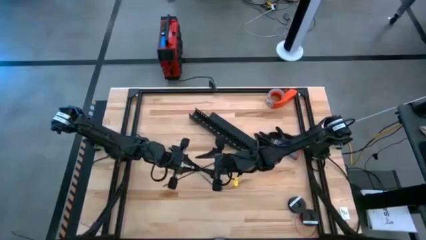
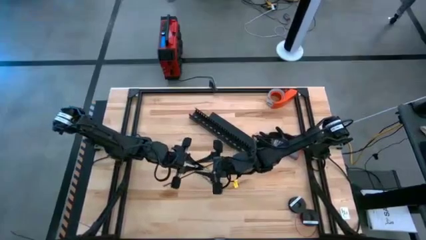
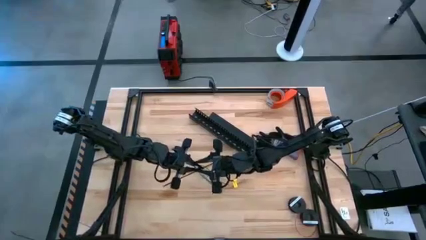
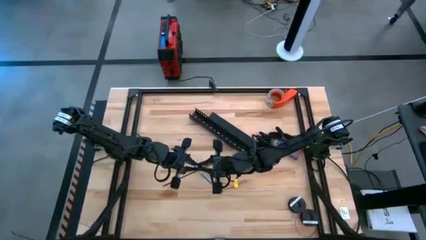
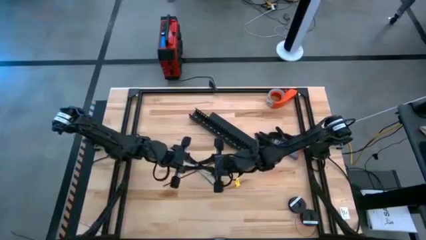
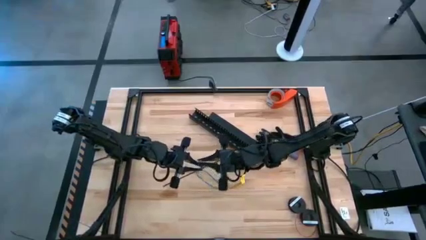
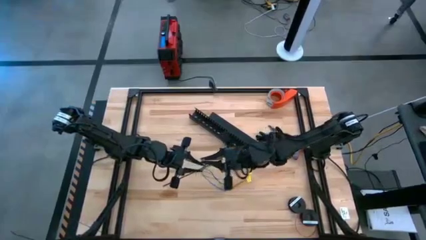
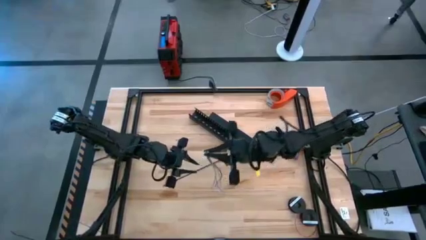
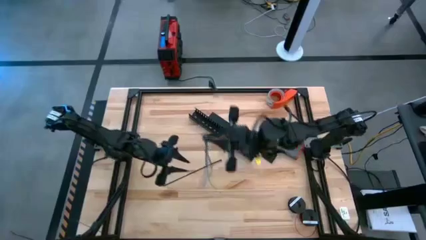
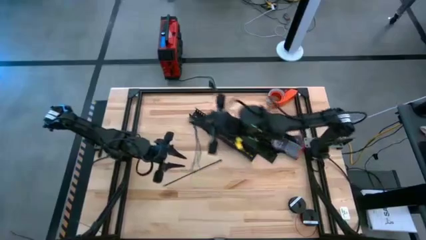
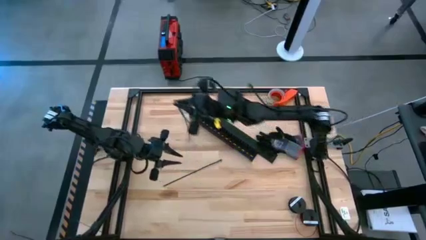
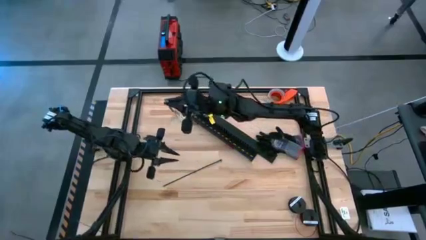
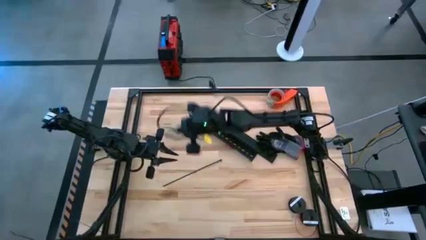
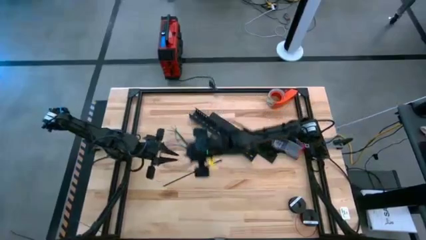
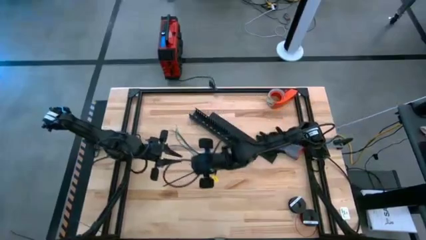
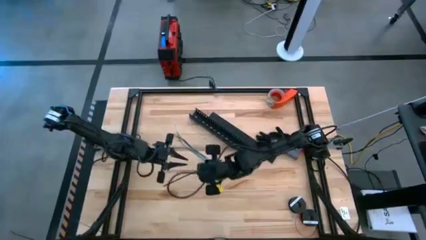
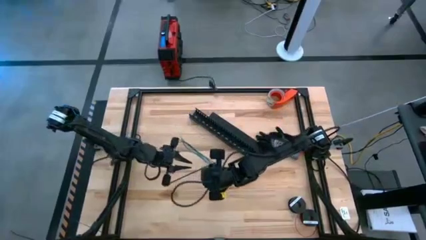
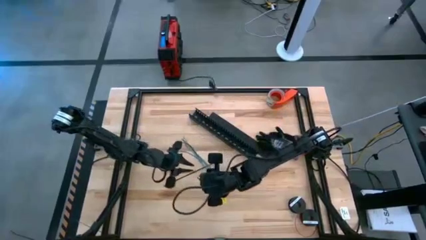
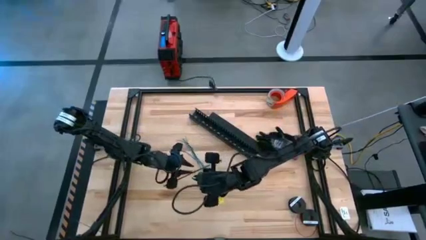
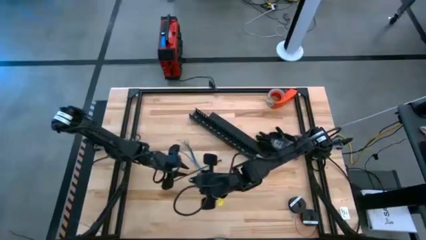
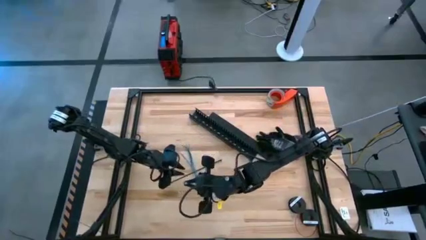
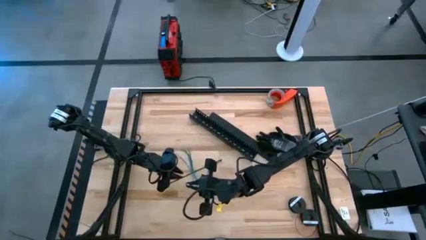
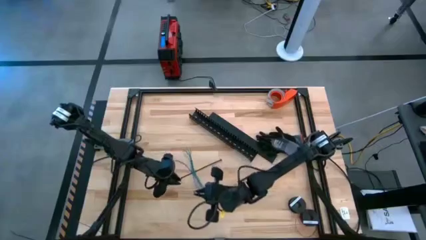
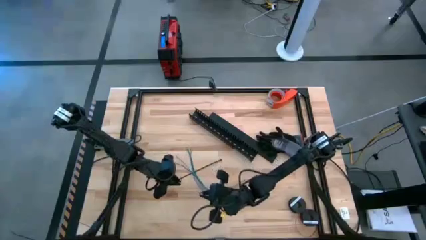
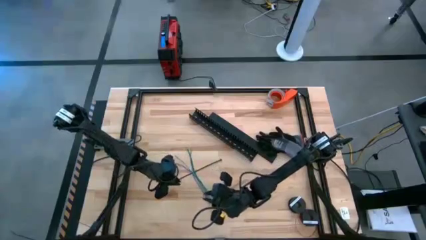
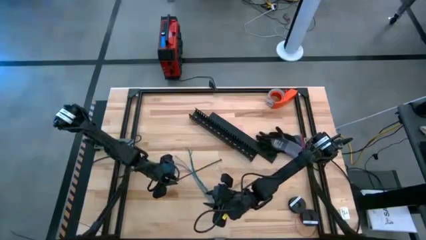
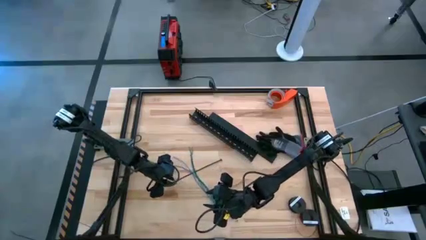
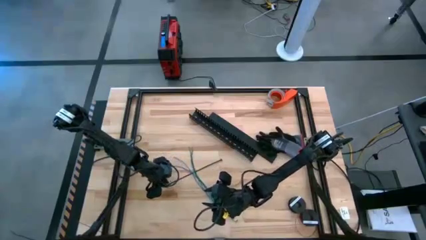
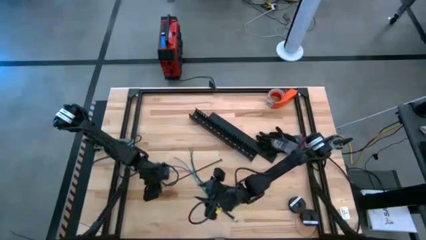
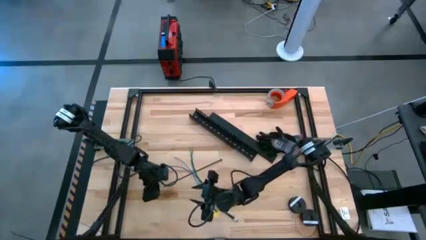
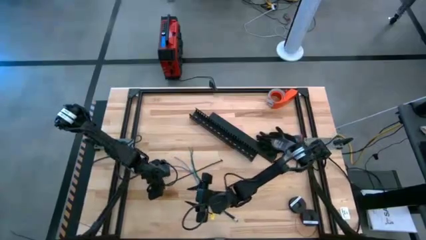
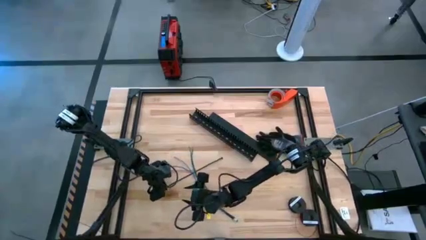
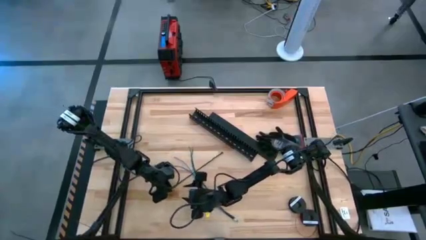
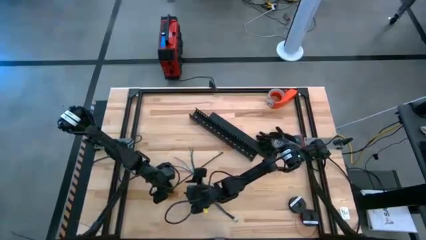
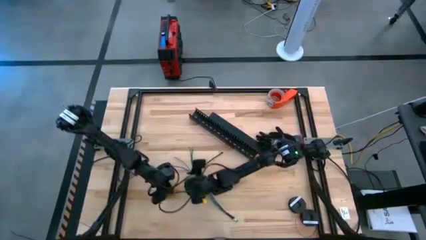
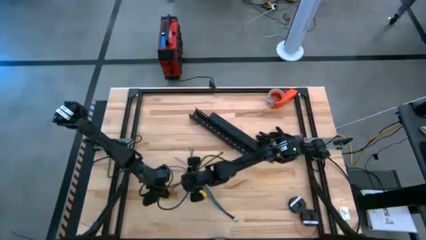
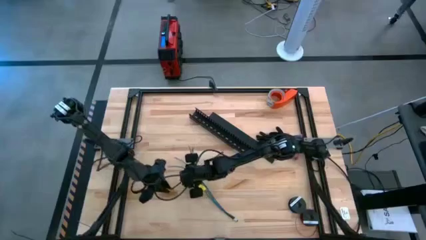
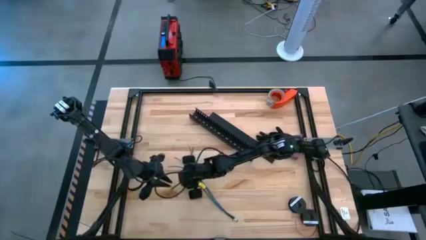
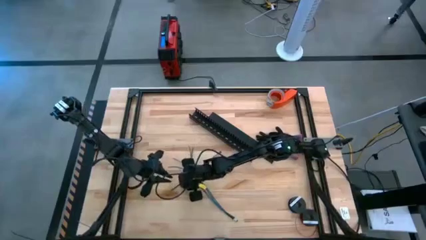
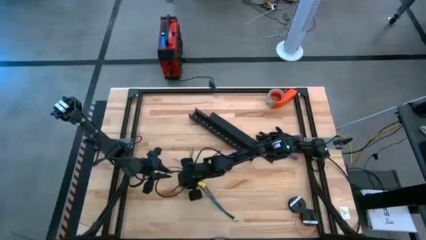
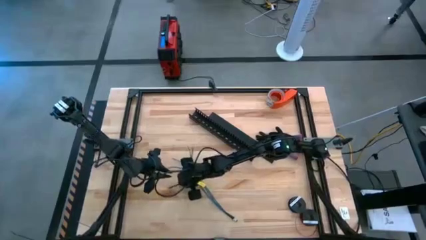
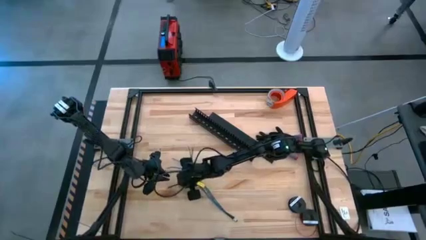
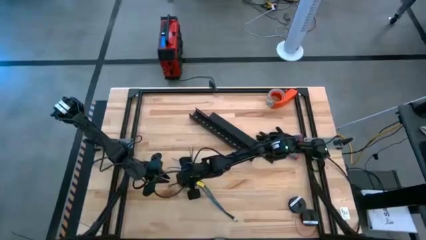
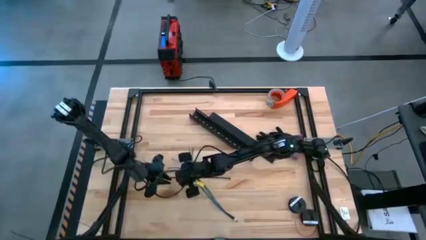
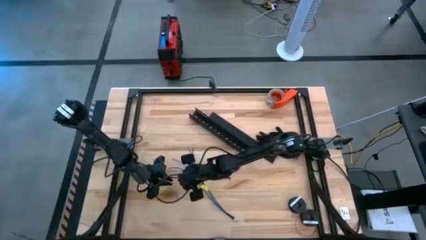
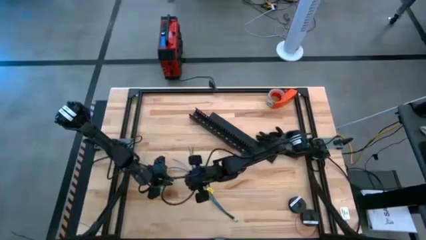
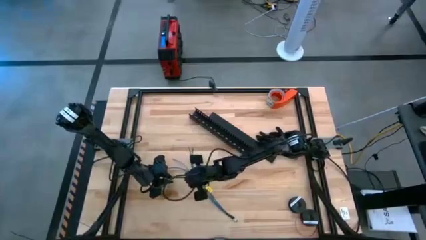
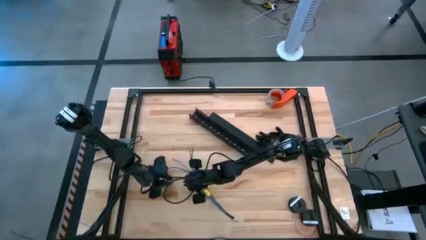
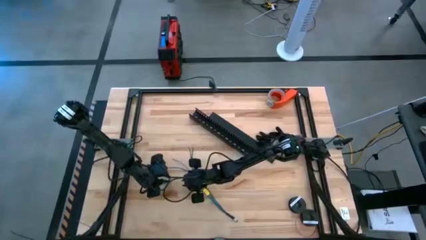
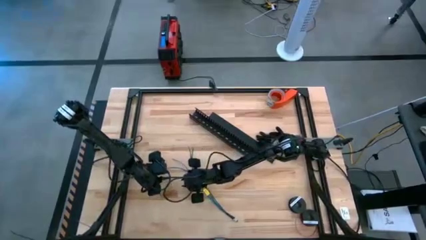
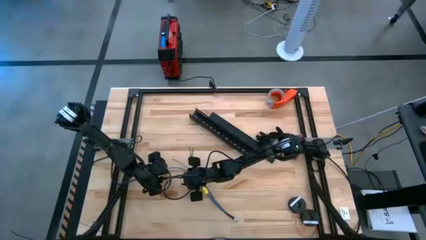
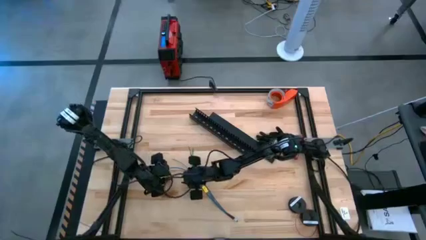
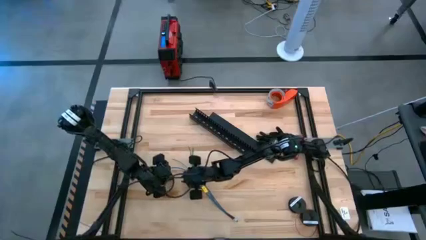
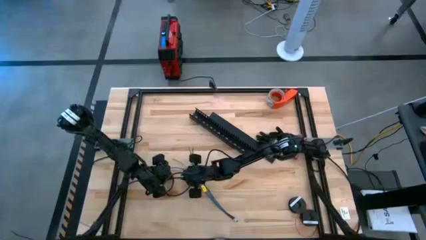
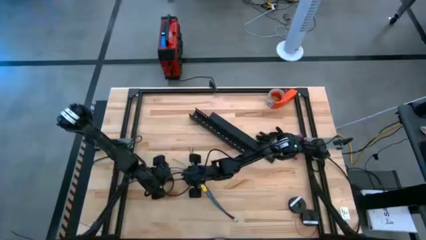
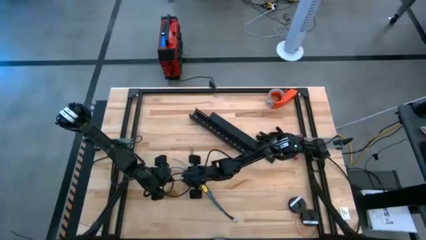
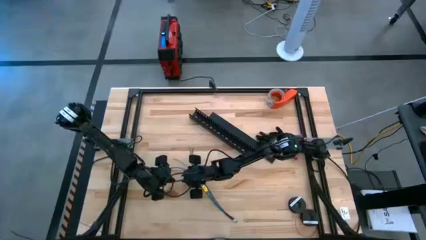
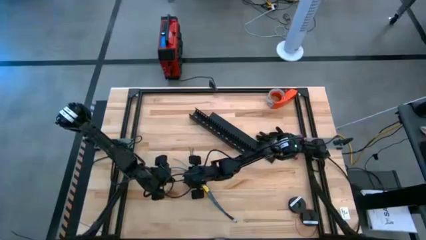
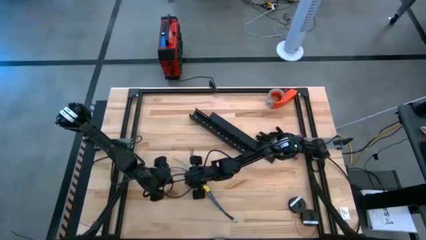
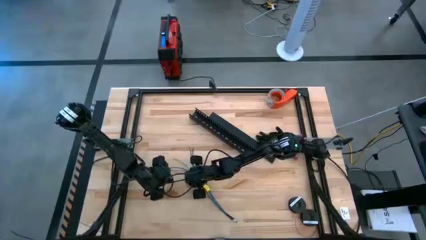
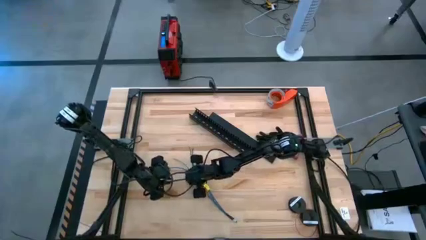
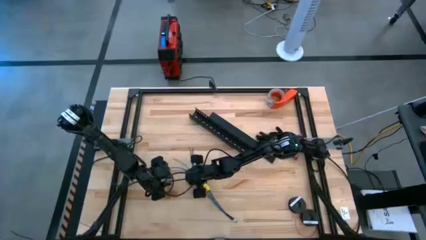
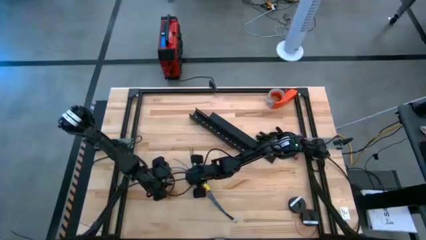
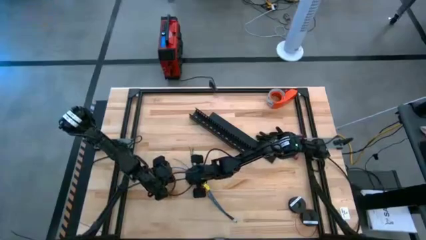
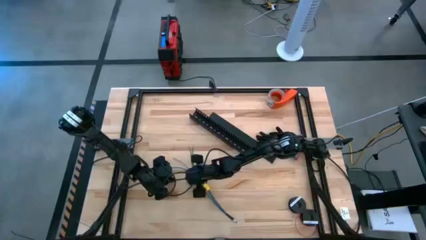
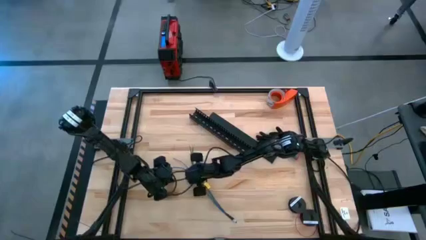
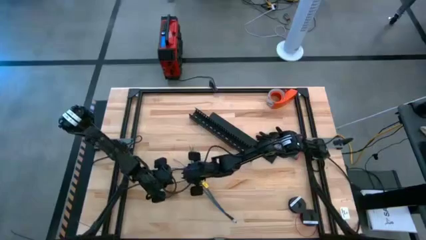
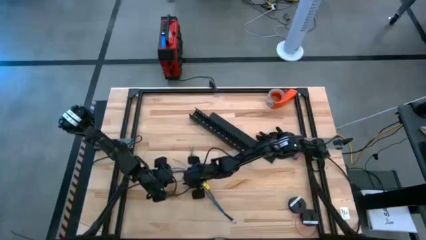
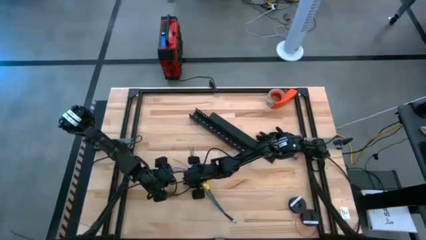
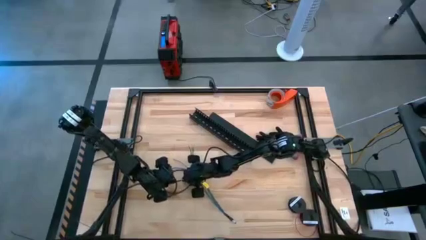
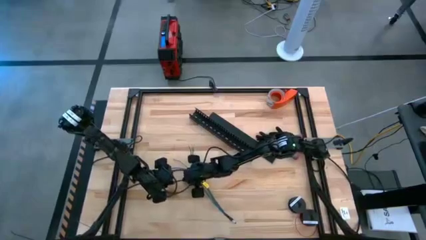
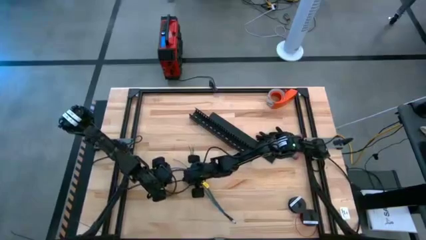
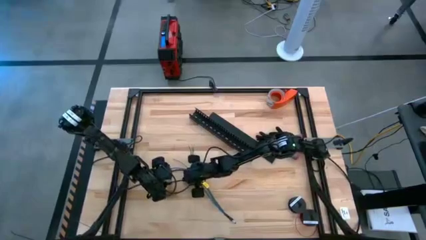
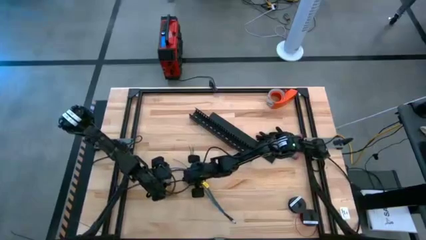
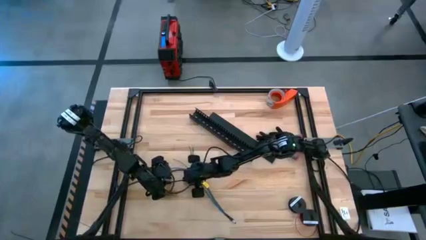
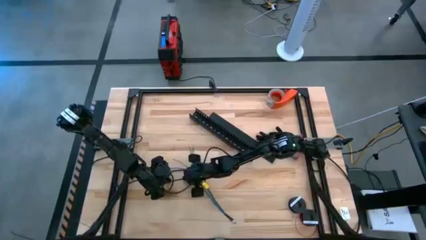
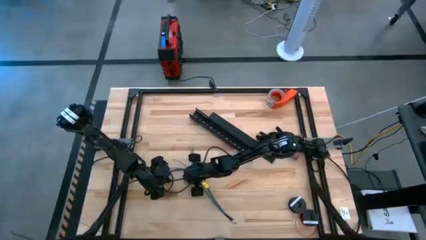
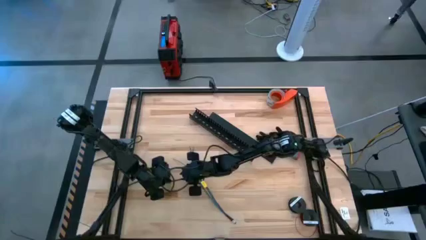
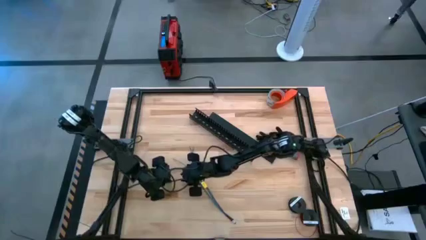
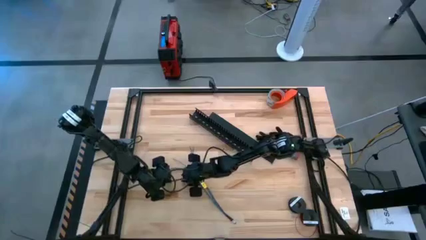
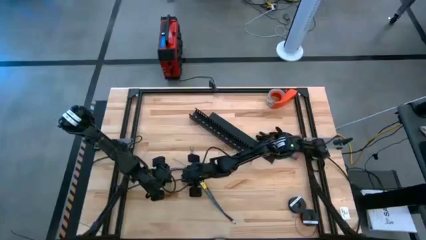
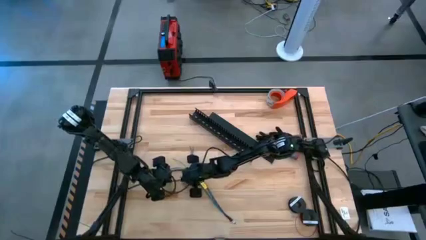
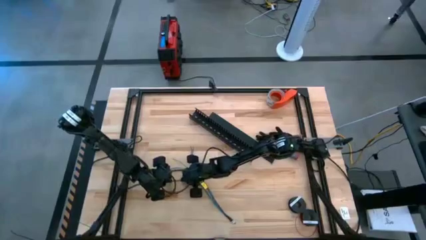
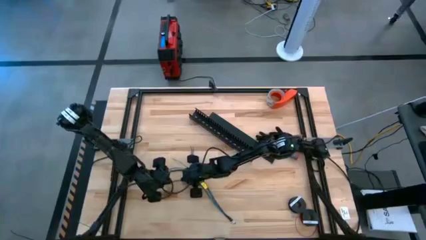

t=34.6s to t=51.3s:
Task: Ziptie cables
Wrap the zip tie around the cable bundle
